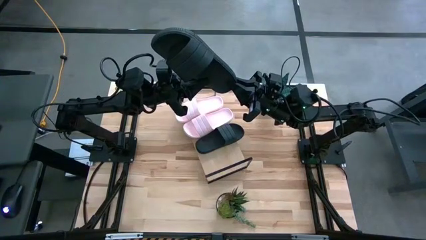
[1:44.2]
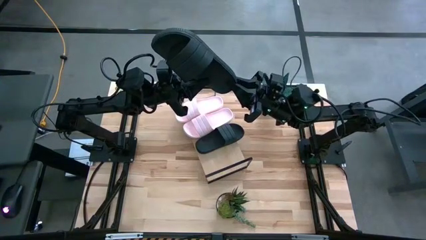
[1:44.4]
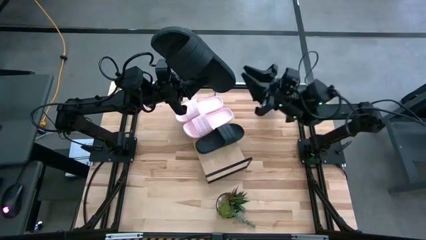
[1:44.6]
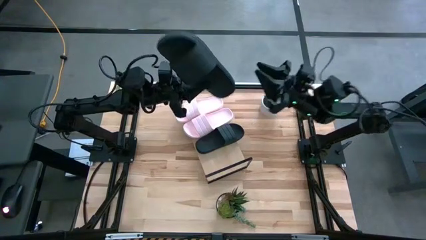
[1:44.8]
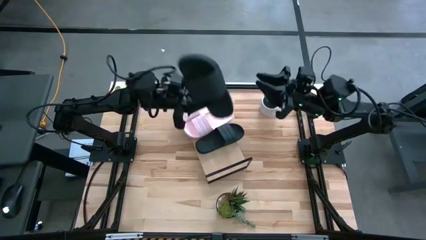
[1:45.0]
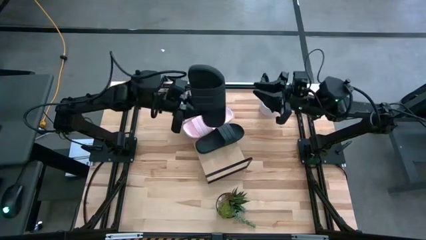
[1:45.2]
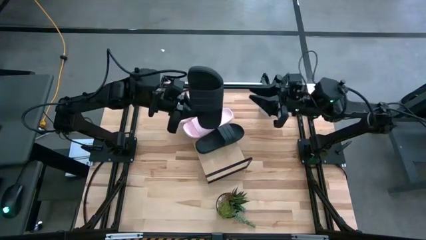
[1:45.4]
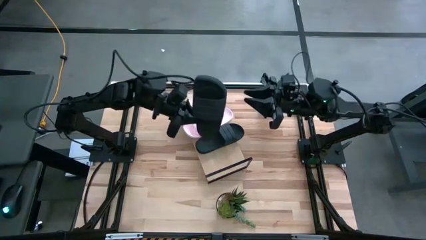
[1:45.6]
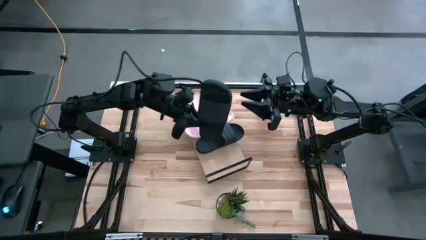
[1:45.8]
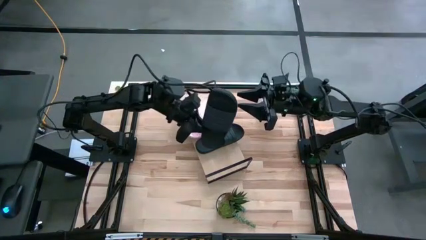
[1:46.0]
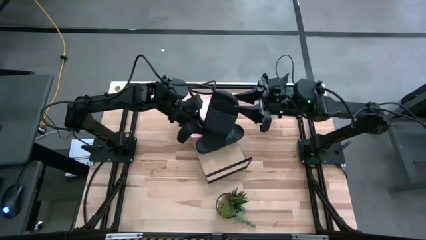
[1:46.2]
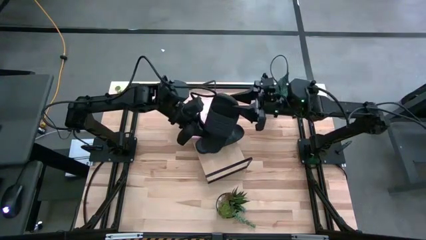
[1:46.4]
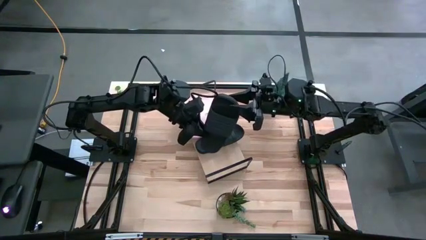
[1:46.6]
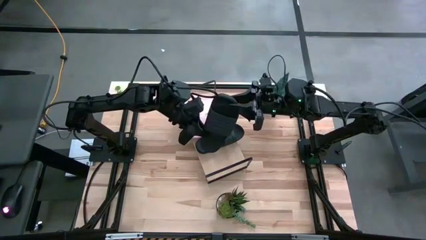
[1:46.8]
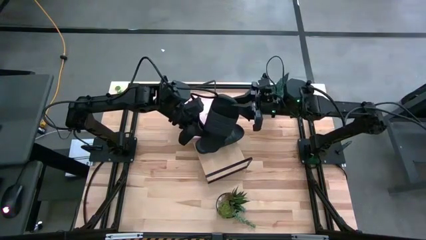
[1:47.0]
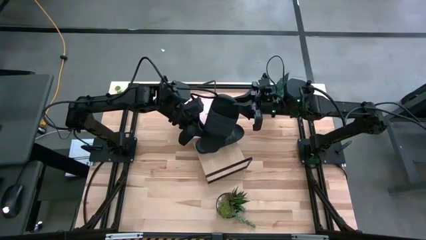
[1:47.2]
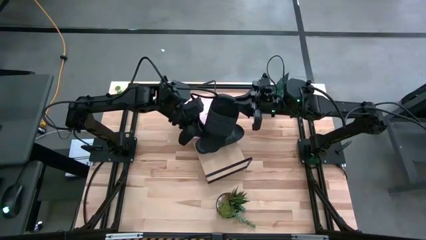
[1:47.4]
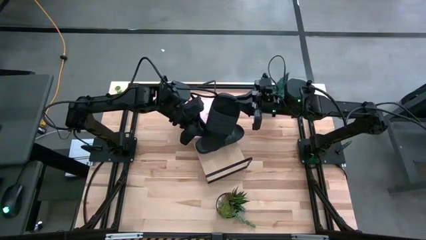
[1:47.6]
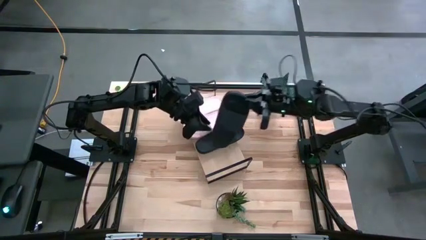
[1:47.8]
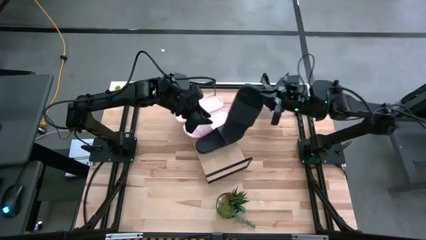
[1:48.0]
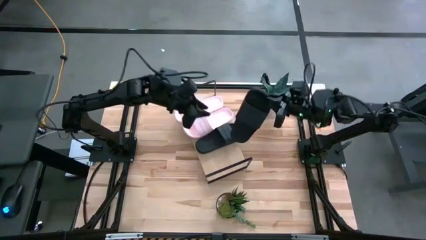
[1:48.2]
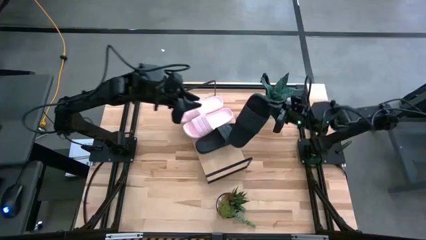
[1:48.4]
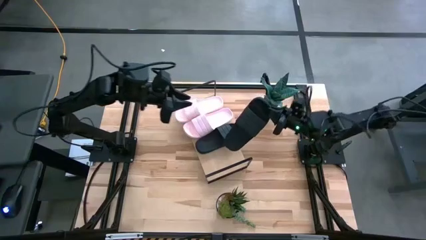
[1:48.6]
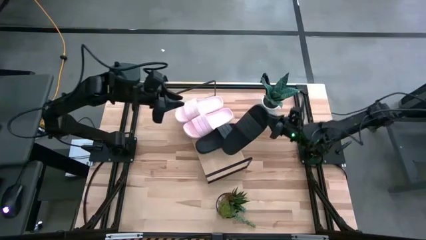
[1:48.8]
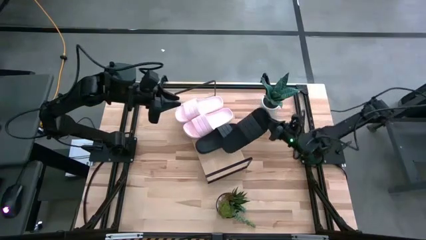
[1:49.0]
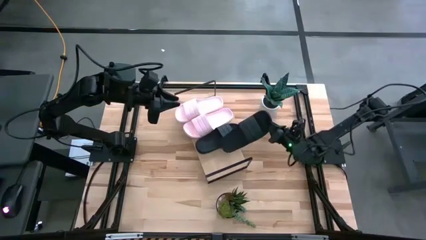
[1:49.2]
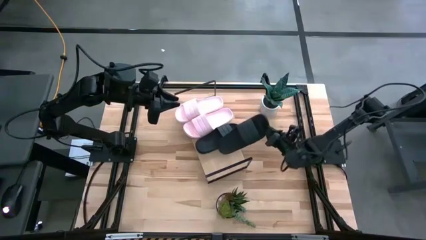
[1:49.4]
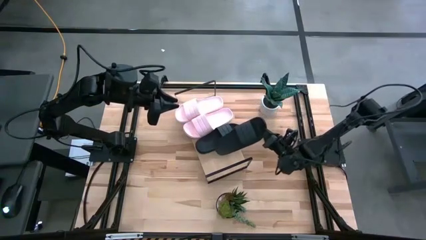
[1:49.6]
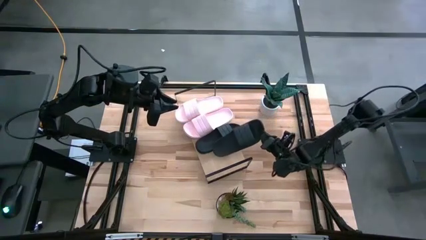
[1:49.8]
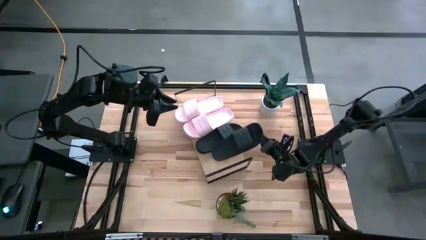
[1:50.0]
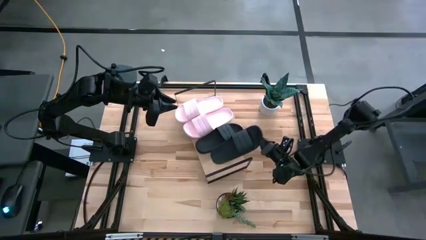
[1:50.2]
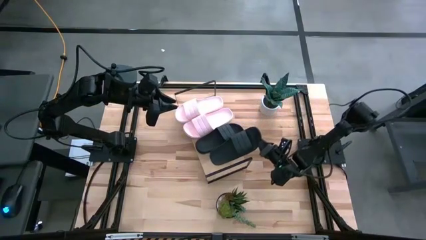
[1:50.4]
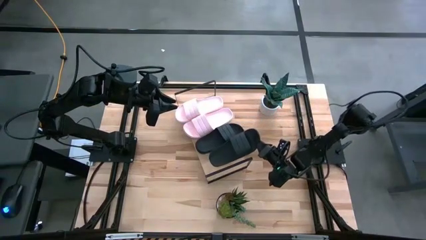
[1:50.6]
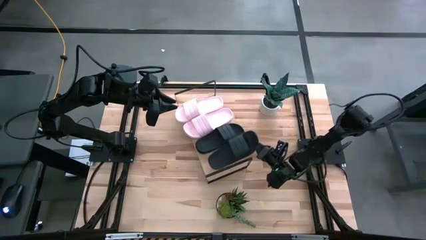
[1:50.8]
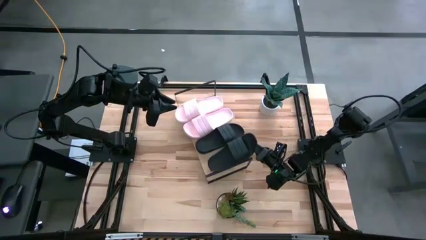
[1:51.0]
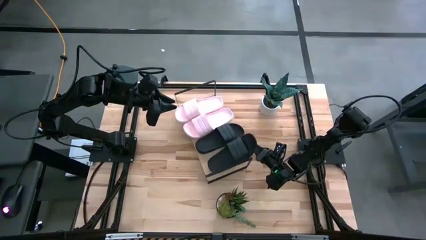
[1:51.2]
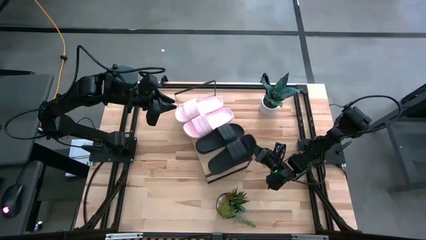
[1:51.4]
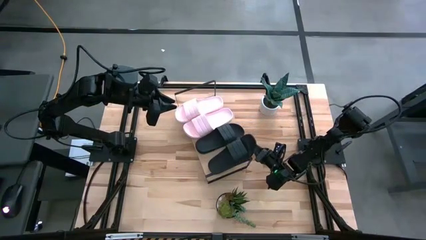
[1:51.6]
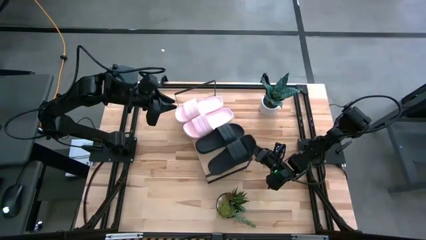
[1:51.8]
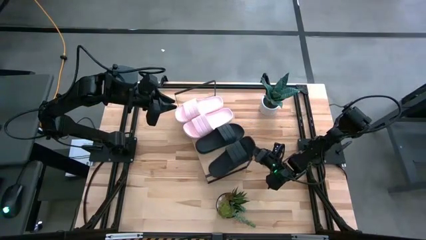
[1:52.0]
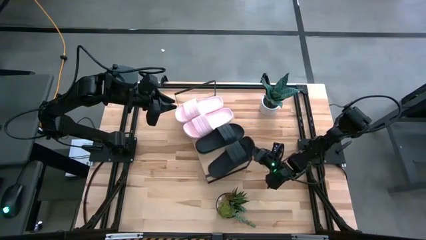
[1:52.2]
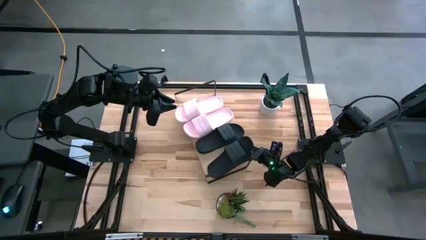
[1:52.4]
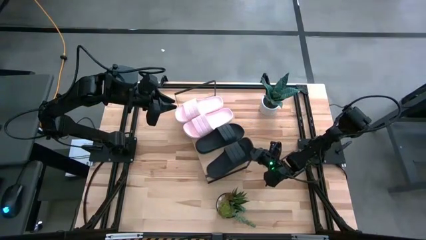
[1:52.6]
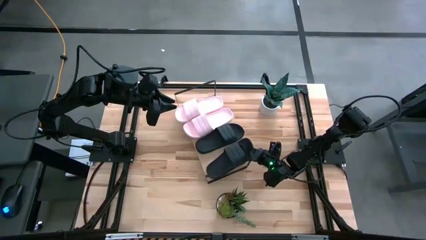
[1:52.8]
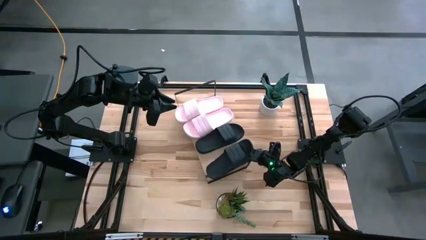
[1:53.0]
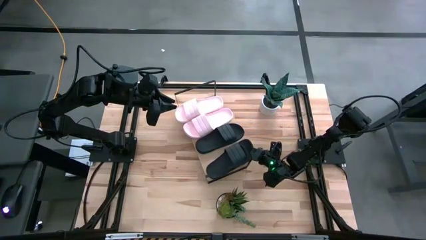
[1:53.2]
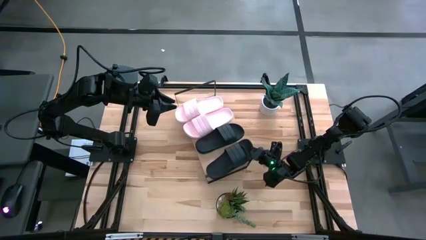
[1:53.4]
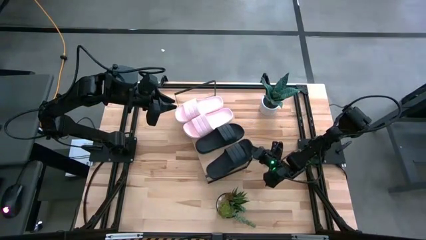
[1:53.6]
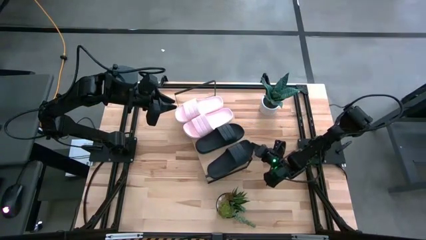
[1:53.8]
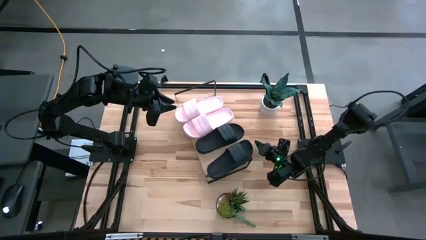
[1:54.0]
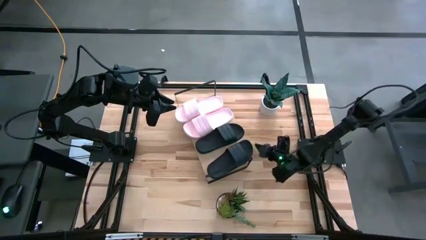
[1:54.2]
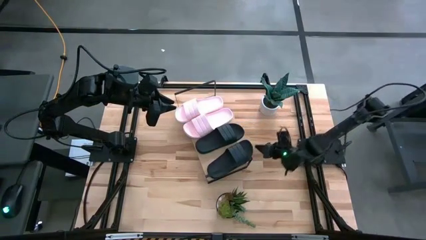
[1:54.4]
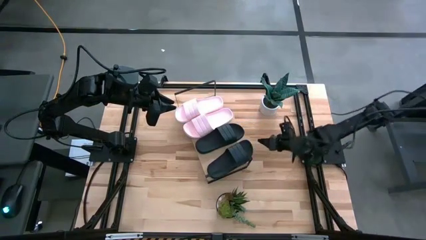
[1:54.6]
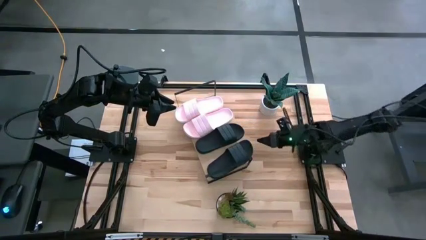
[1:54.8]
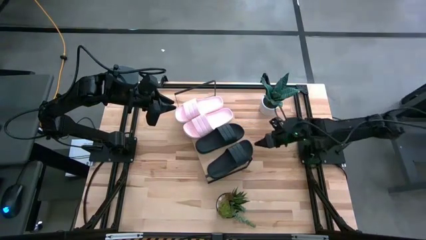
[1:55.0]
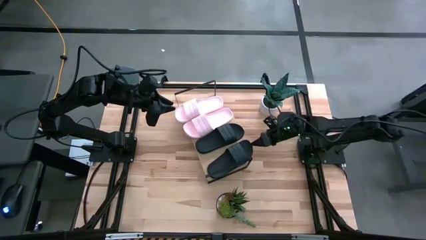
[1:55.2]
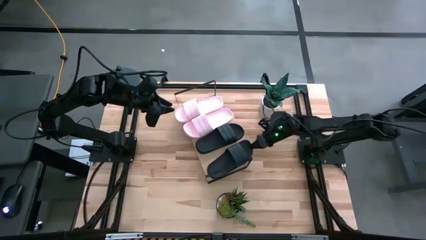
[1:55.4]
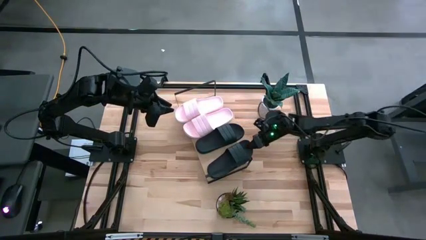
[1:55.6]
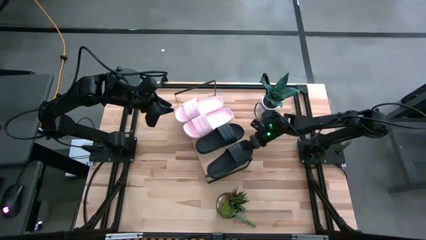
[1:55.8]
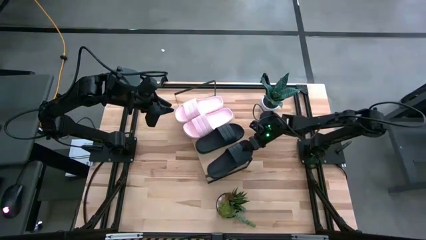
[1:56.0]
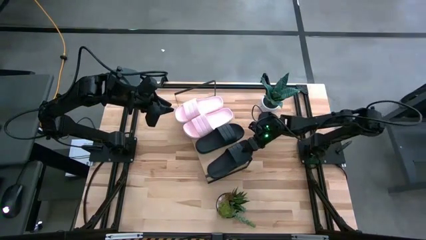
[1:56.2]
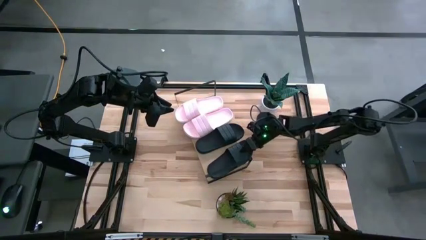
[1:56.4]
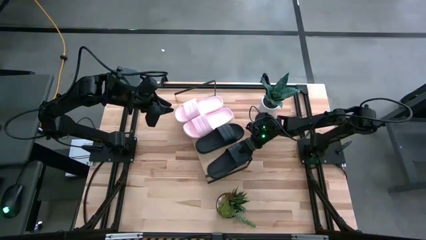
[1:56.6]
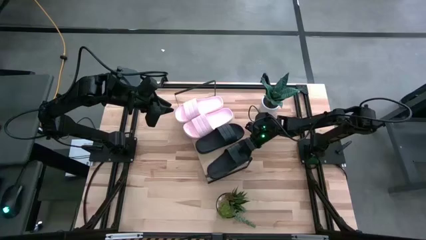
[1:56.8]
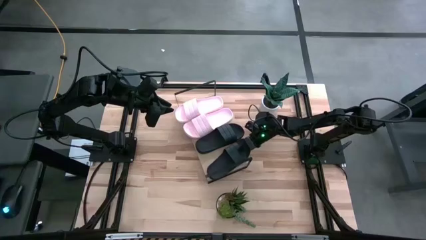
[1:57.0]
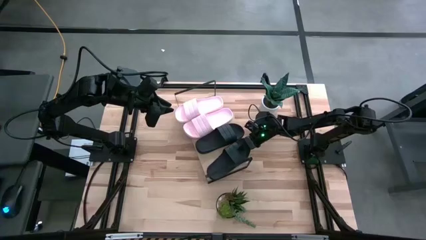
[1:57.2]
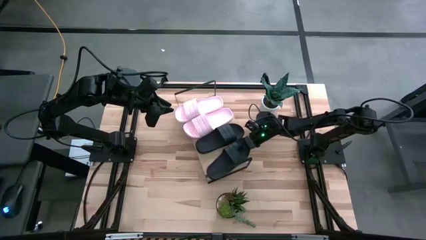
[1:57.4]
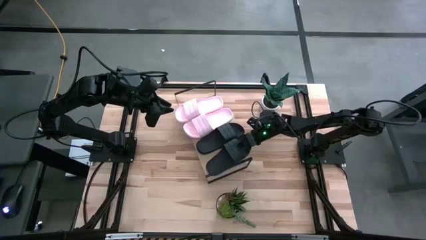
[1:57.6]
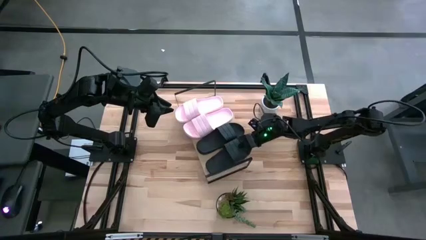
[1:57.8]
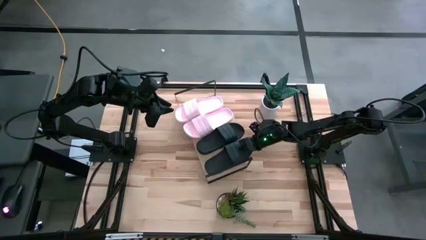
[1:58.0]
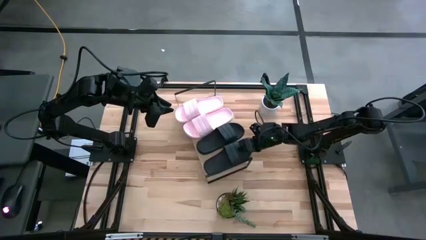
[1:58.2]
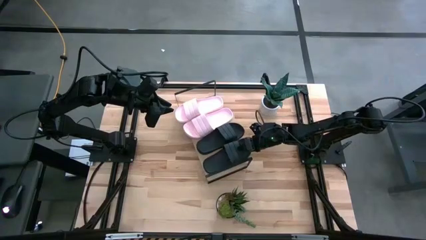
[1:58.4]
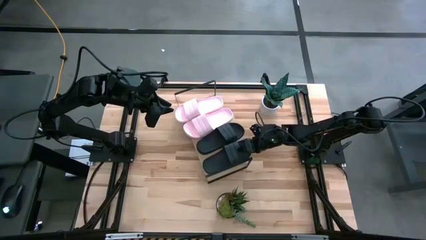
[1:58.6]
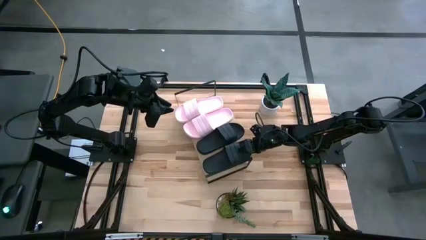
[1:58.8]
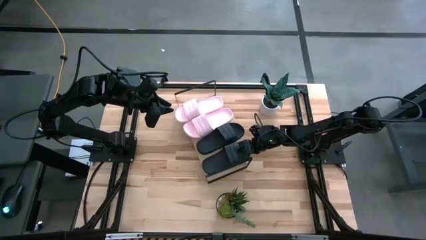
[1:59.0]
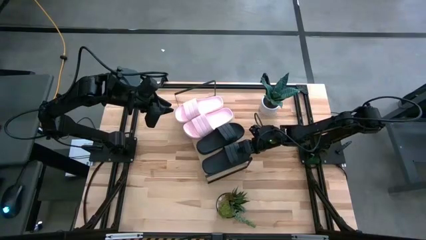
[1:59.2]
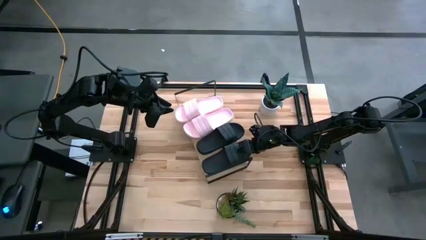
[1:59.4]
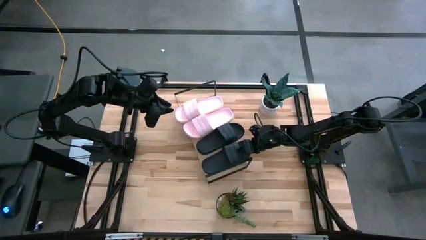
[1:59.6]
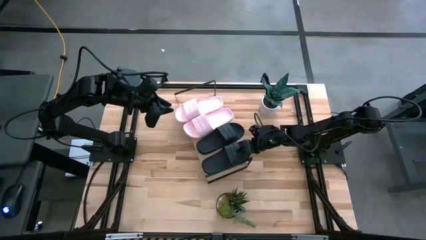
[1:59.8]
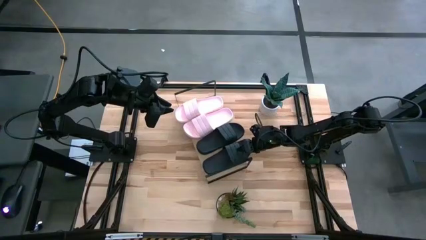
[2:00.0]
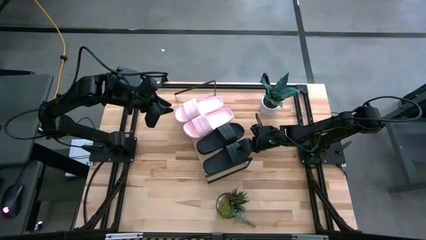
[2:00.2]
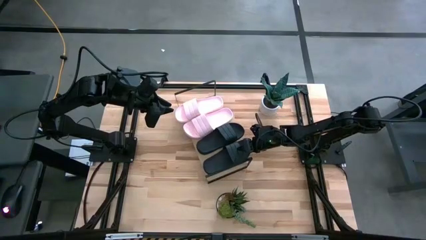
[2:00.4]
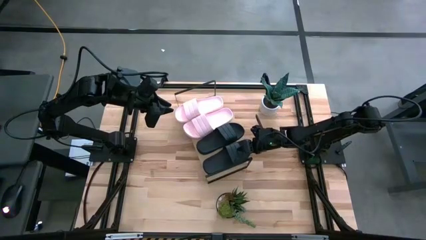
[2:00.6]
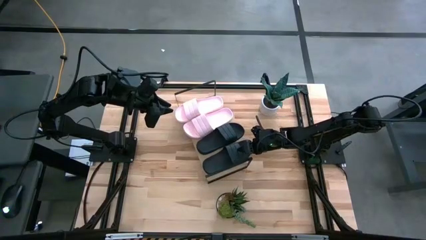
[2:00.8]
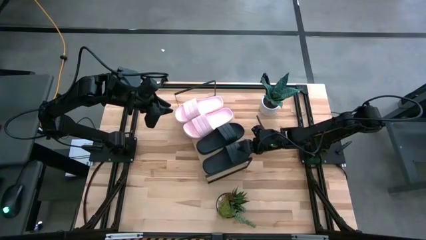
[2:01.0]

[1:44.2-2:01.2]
Task: Pick and place slides into the shelf
Put the black slides on the shelf
